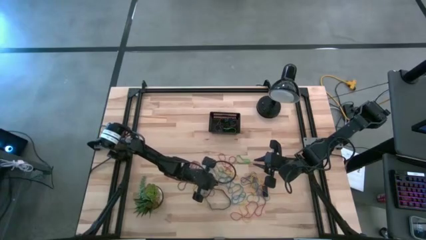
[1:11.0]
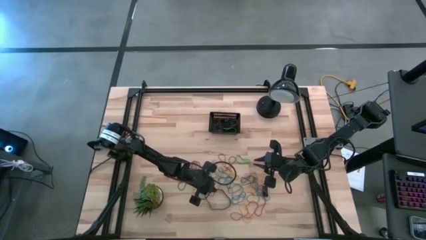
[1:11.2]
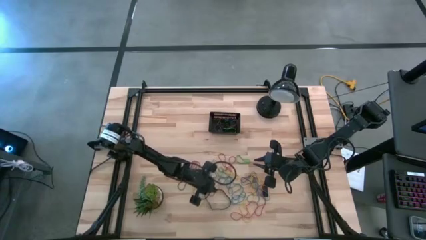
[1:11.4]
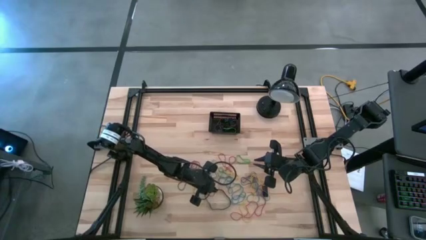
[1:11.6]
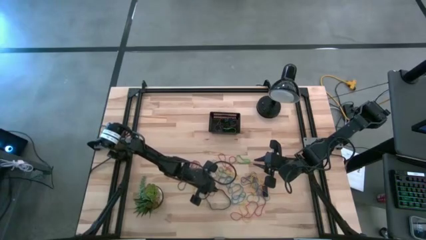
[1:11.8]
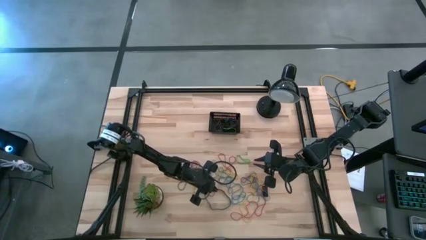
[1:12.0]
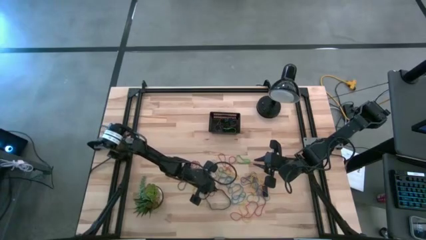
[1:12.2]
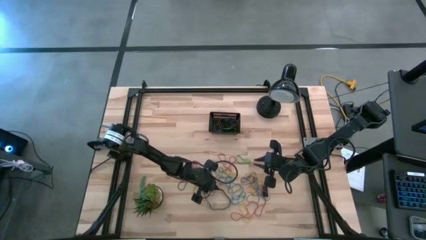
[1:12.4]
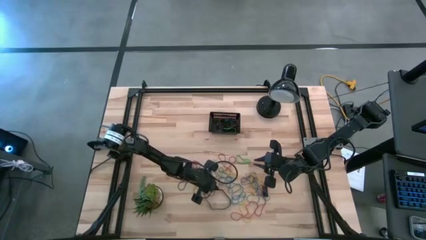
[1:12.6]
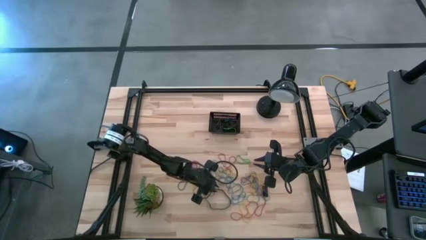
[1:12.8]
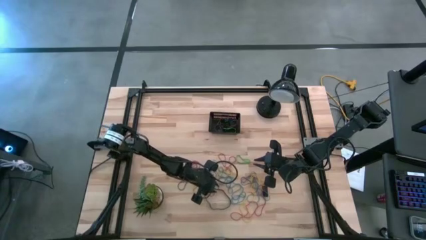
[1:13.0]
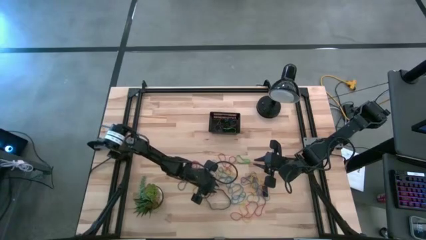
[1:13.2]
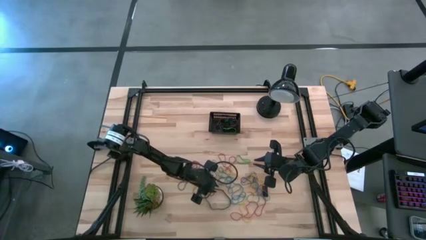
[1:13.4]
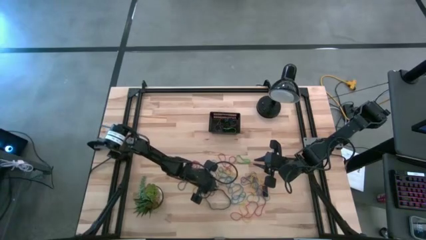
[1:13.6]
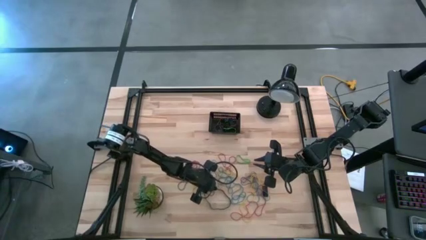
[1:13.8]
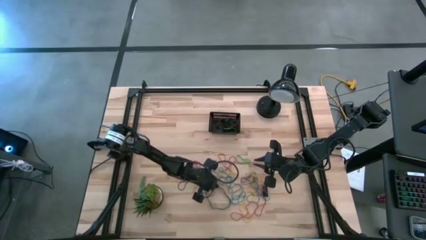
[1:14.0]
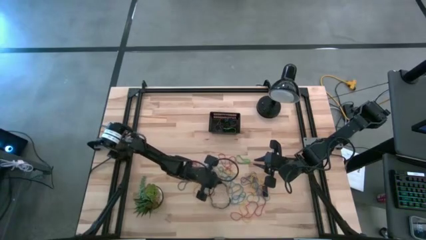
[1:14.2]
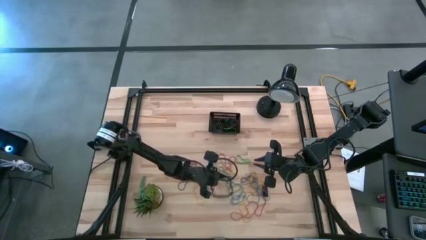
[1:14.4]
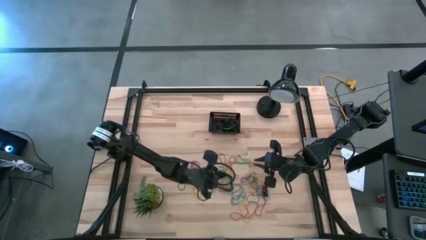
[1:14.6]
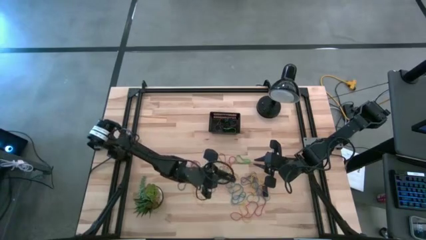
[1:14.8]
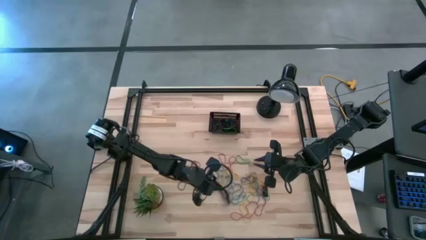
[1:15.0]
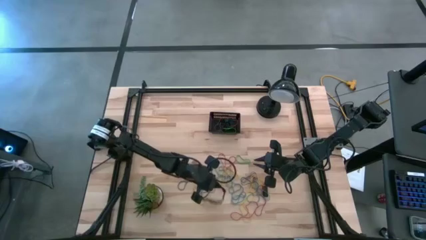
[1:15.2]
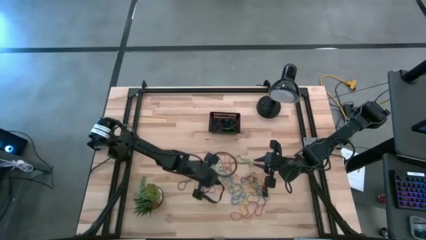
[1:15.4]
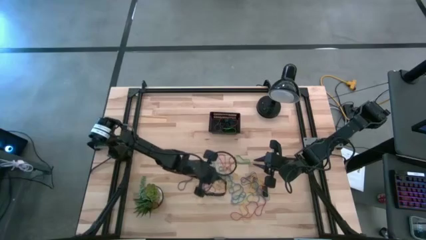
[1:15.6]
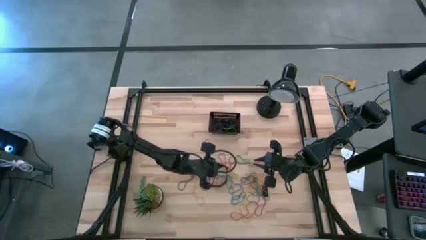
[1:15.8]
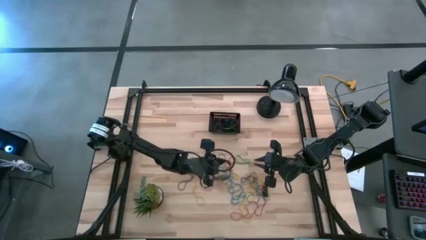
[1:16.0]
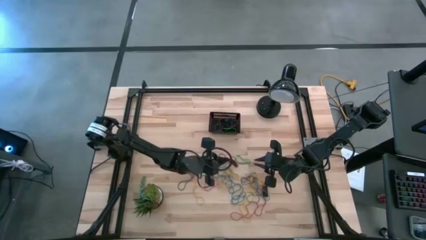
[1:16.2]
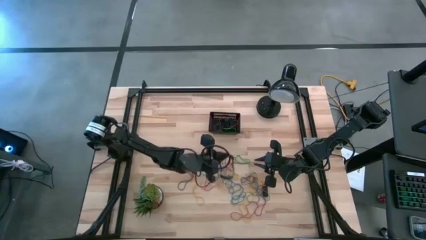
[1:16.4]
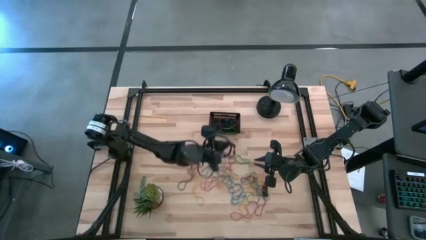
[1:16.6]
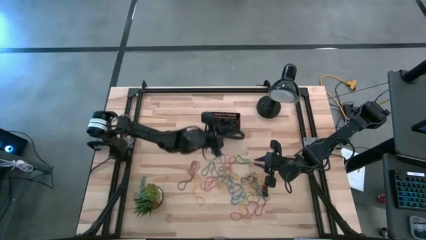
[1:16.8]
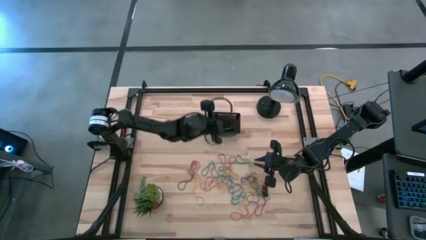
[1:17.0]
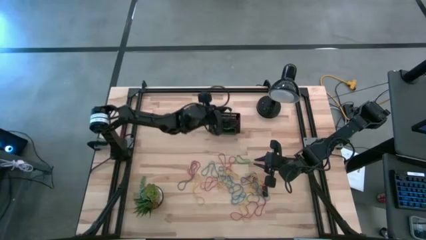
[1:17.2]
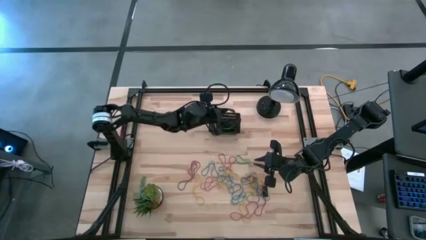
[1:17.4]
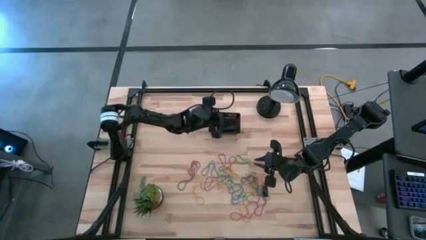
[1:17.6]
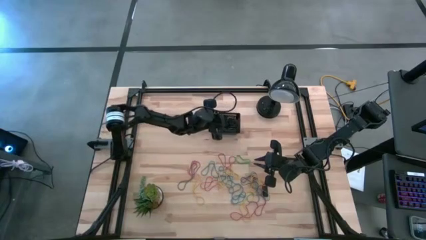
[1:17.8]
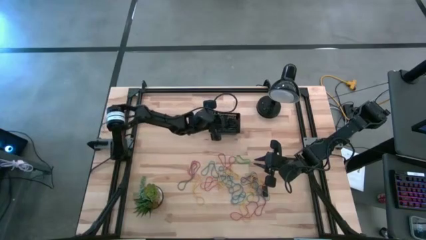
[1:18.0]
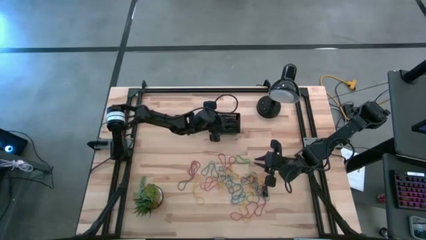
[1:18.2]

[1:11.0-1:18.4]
Task: Pick and place rubber bands into bin
Put the black rubber band into the basket

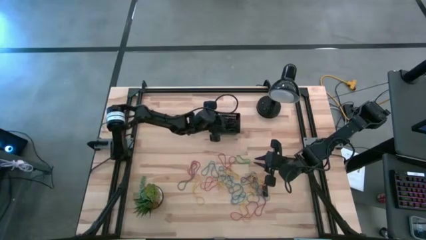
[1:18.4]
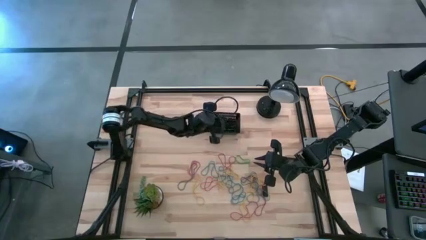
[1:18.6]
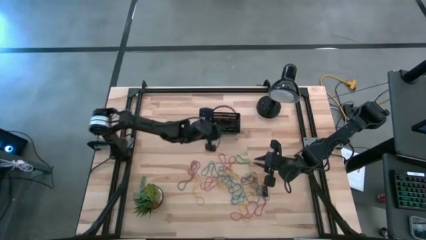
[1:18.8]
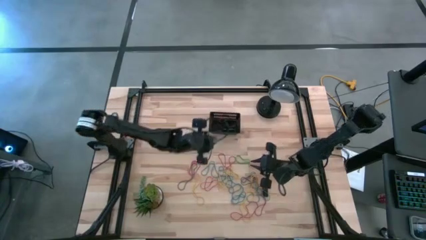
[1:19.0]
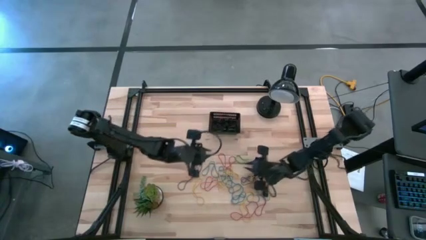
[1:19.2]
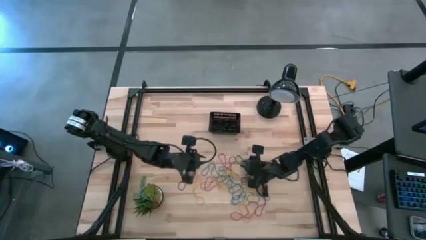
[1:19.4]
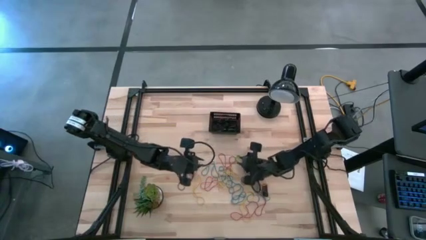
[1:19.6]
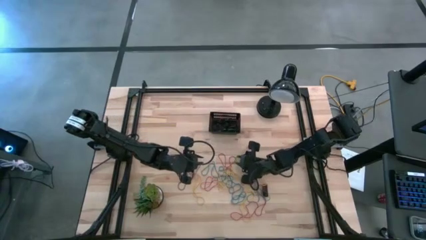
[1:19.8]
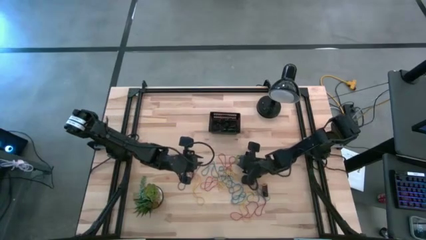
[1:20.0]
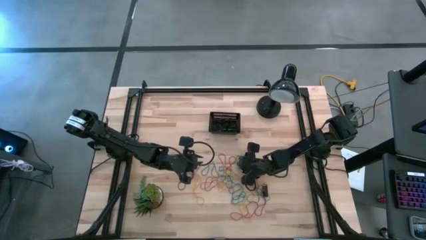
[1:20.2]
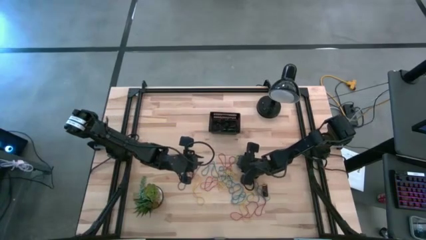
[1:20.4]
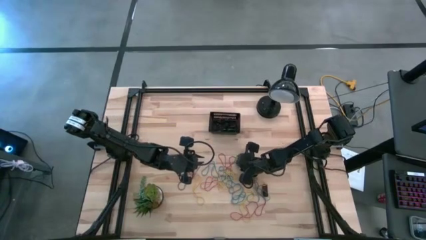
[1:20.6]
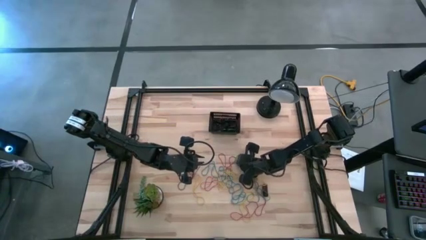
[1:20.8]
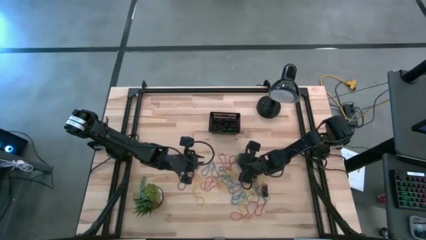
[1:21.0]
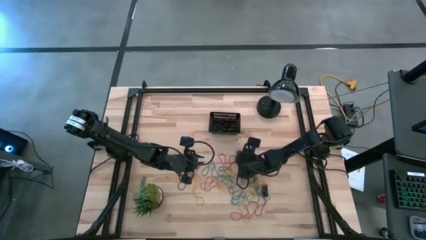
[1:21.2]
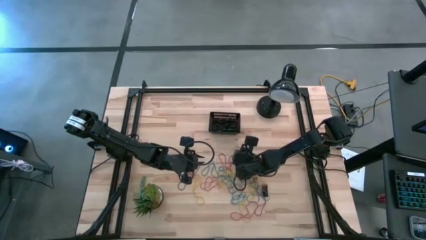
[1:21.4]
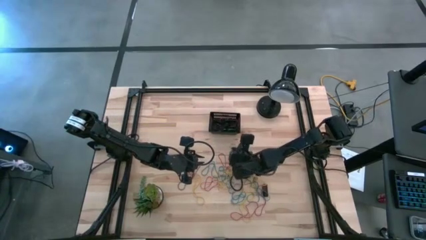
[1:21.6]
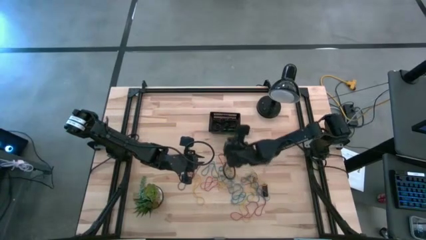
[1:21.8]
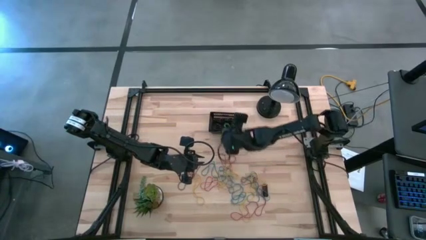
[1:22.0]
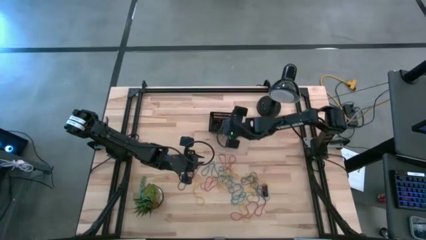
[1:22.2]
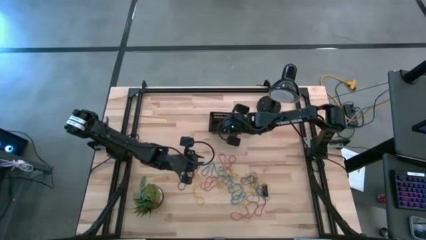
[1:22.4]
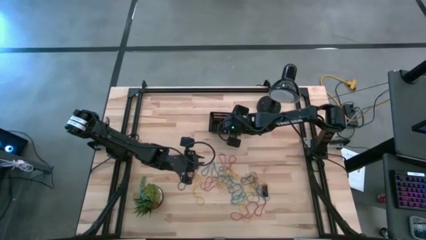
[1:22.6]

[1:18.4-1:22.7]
Put the green rubber band into the basket

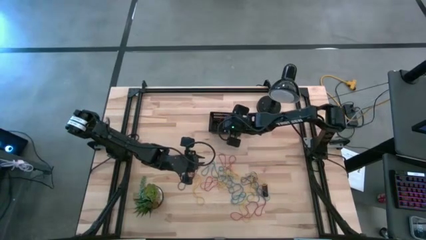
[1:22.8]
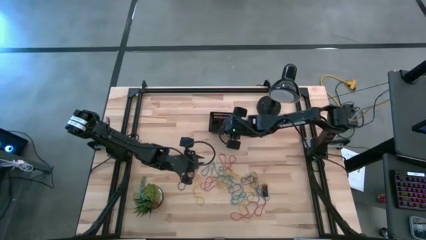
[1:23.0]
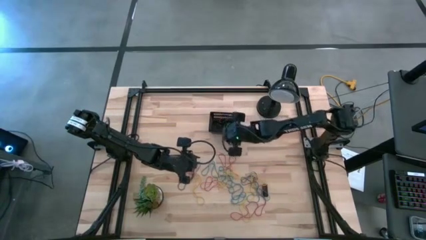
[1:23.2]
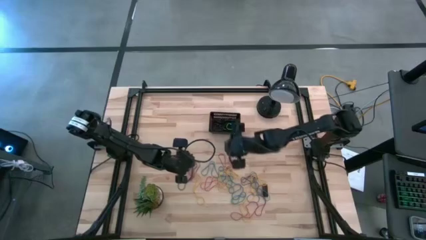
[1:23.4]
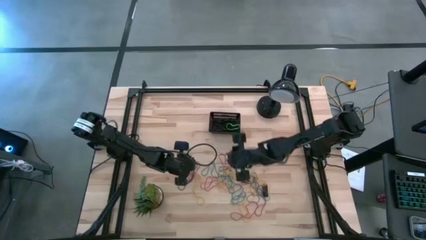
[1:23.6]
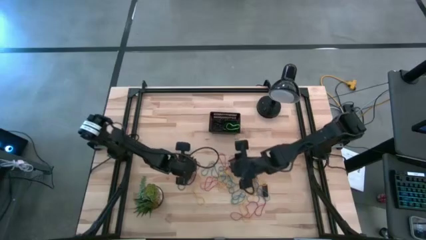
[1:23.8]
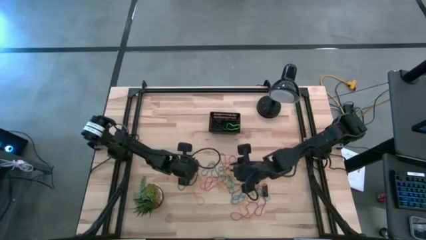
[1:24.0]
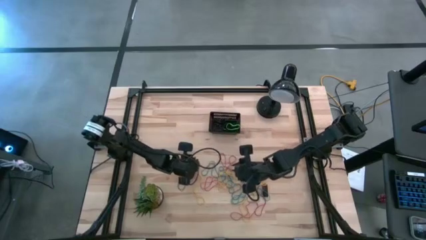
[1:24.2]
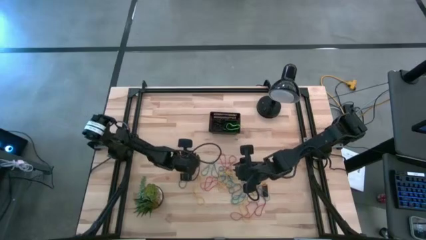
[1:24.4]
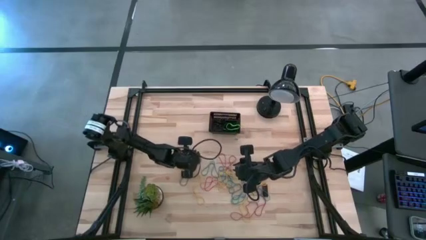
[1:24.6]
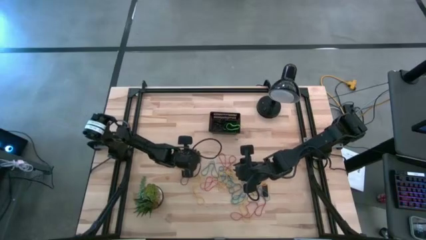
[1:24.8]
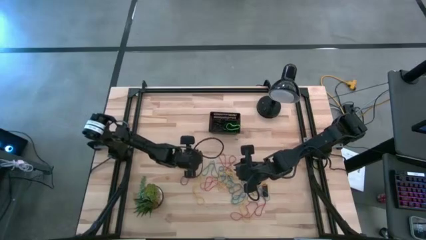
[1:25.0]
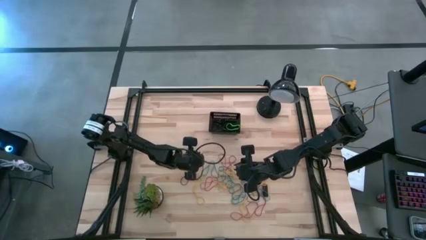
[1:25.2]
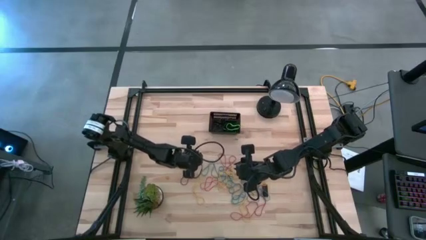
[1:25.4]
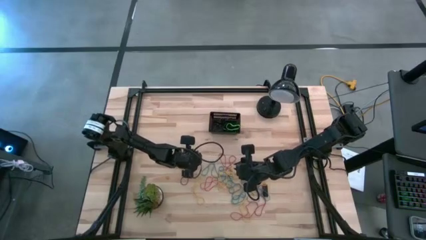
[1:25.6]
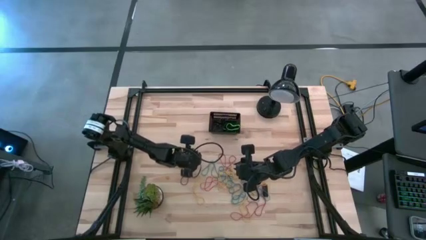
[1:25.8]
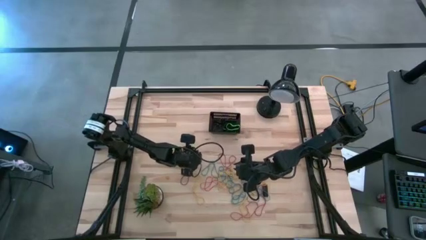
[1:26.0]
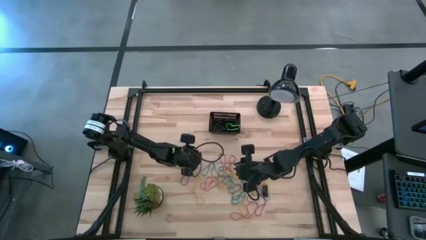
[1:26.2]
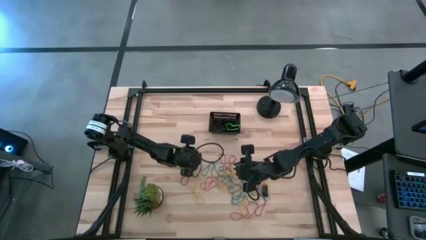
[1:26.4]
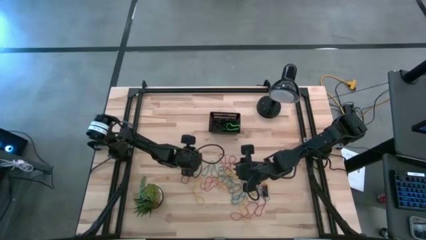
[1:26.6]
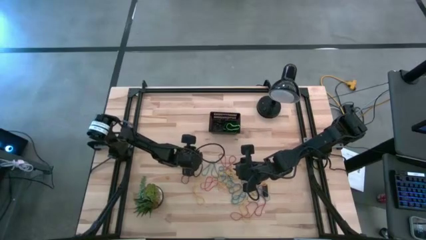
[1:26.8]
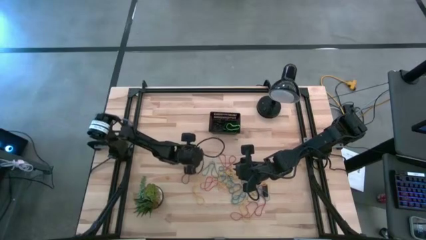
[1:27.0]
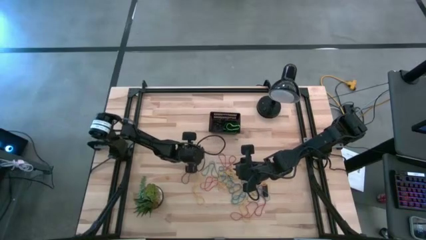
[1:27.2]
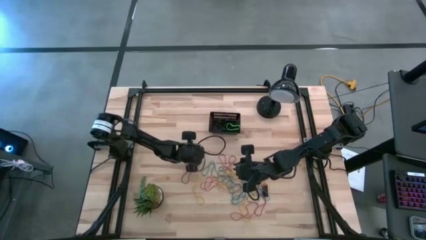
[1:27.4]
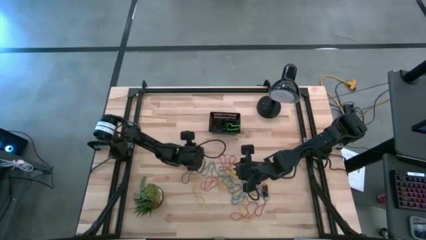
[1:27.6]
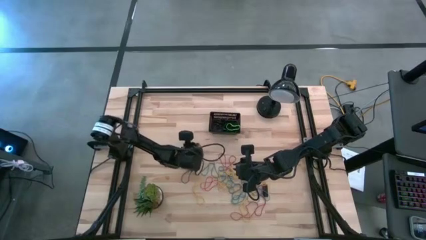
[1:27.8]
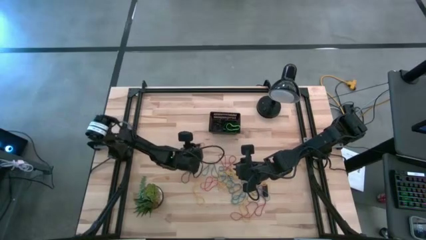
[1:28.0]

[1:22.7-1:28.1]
Put the red rubber band into the basket
